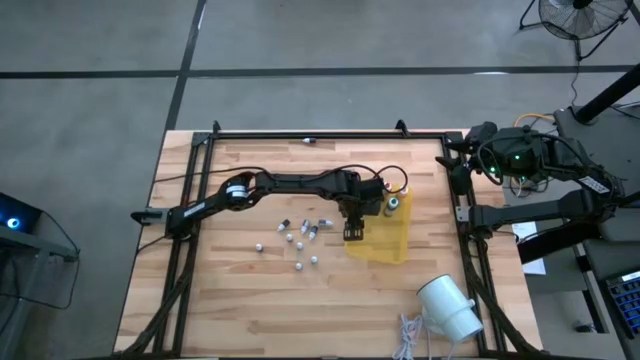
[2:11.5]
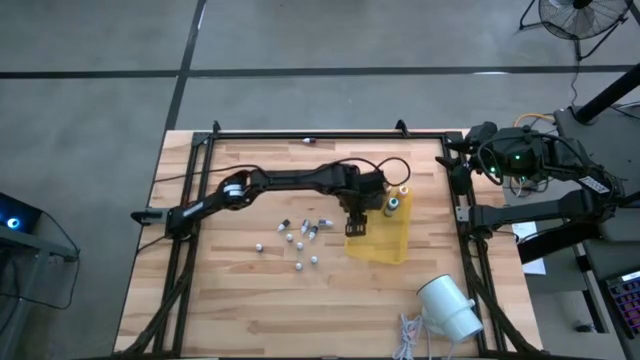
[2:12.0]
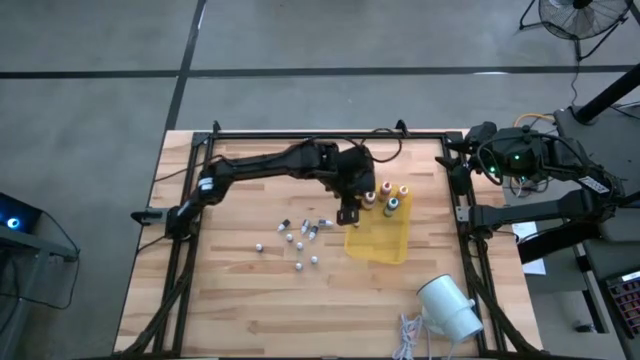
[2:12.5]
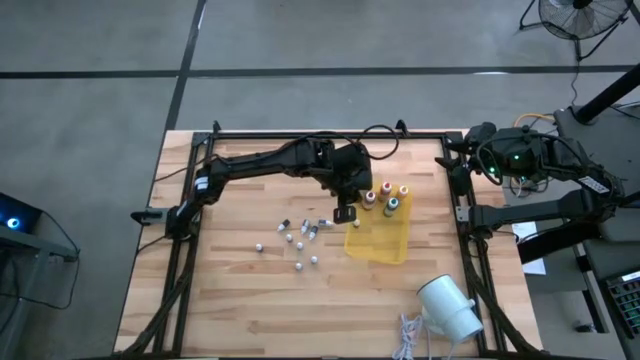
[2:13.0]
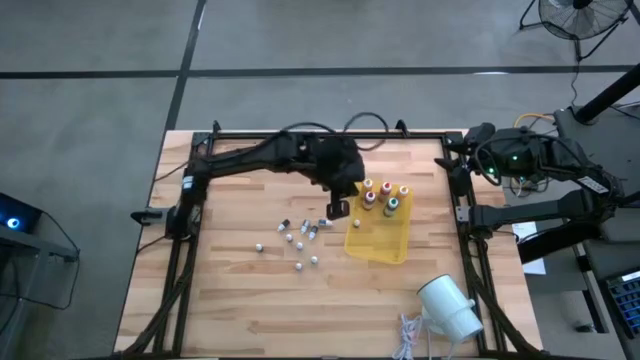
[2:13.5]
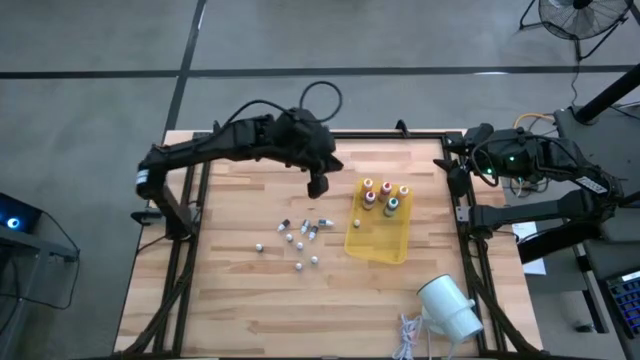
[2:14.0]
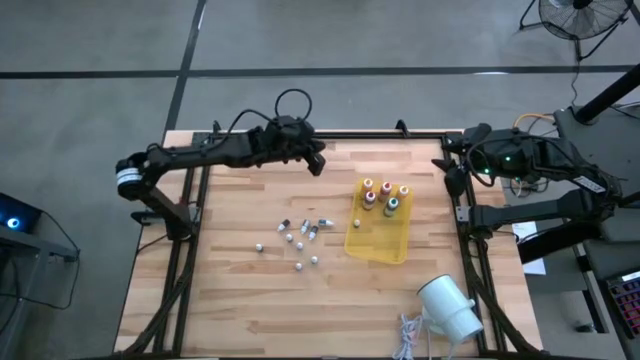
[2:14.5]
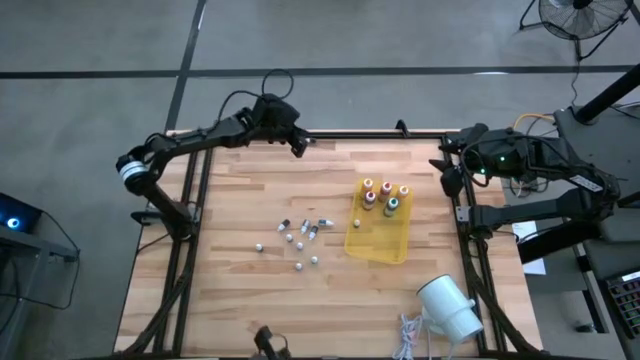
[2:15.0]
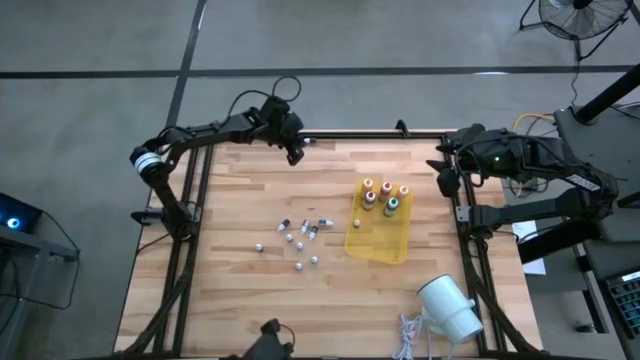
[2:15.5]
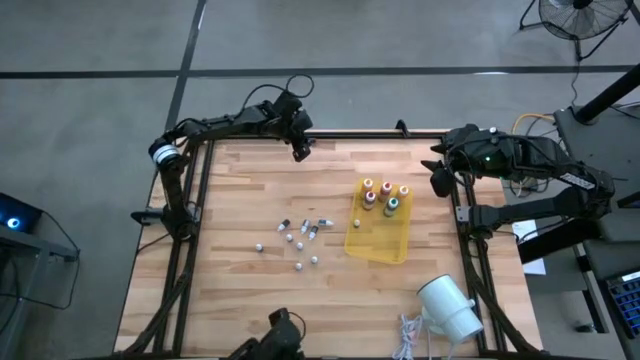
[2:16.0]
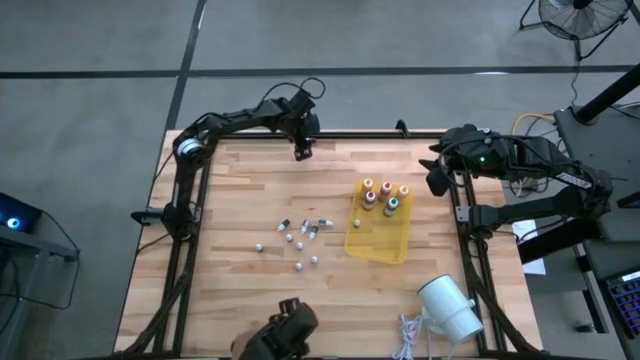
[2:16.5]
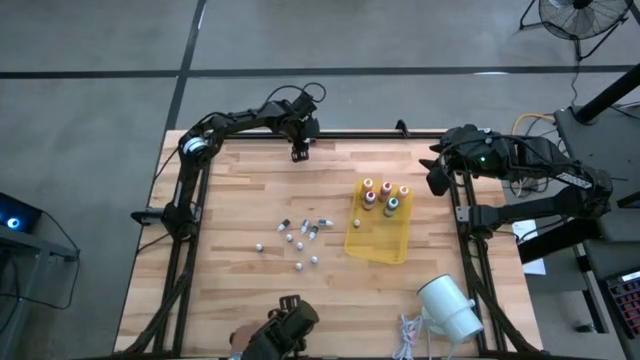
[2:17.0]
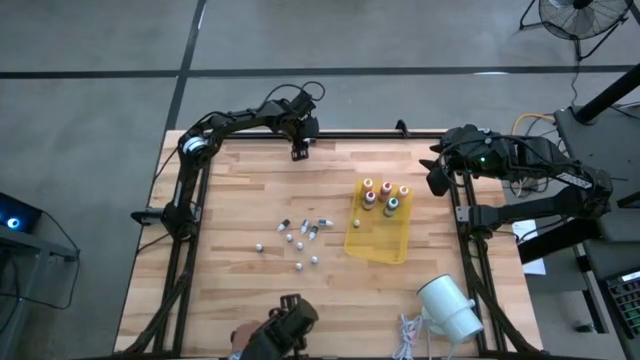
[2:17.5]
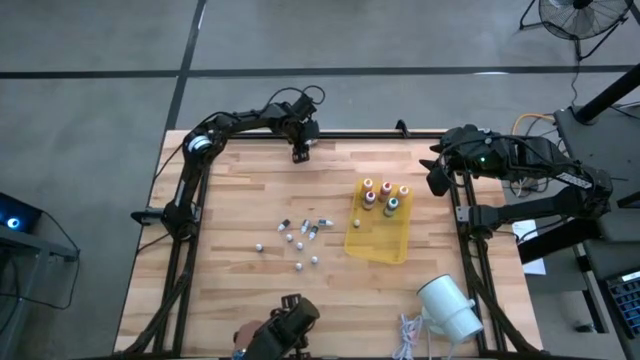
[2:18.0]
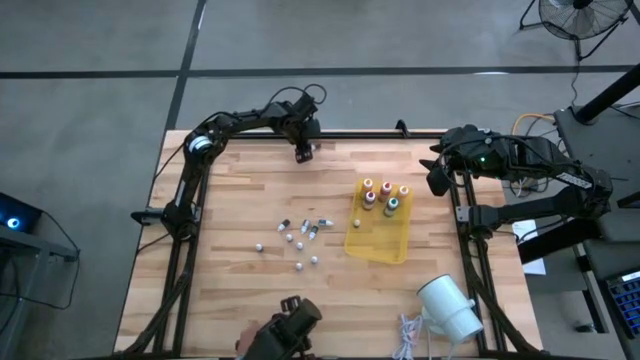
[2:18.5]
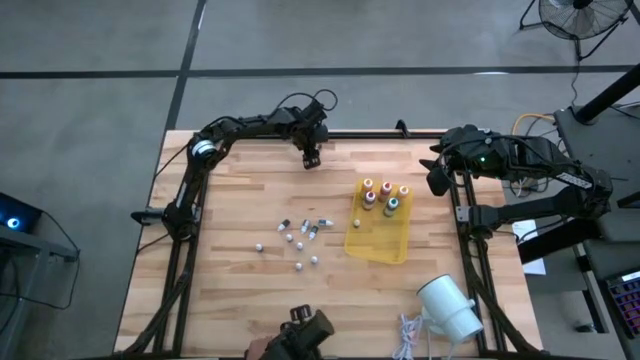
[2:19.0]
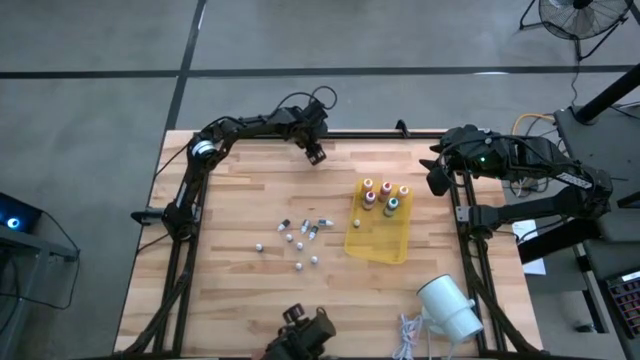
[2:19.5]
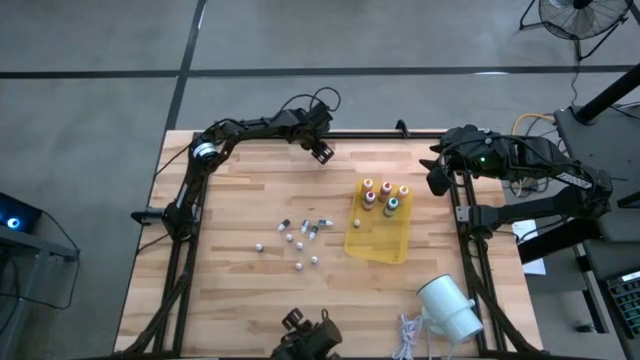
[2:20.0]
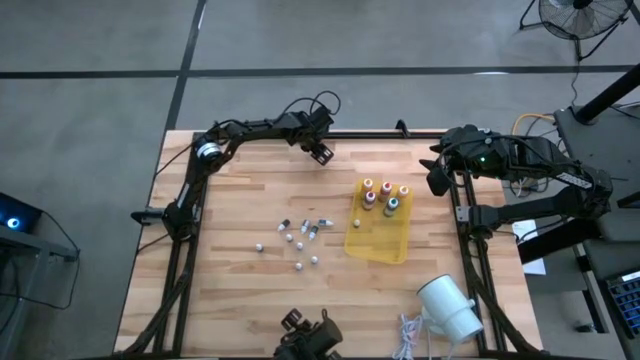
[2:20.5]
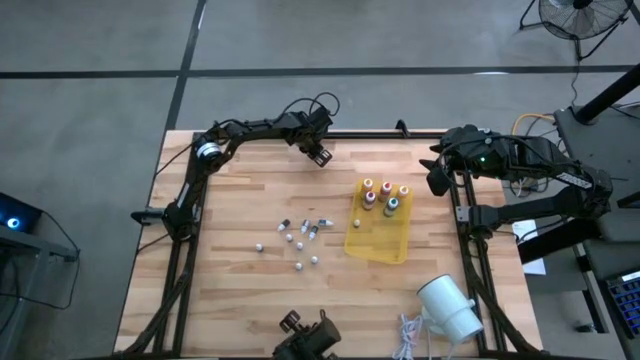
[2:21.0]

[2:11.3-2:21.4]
Task: Pick & Place food coloring
Put the small orange food coloring bottle into the yellow bin

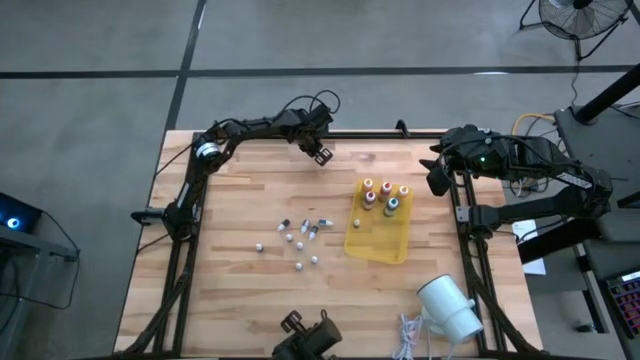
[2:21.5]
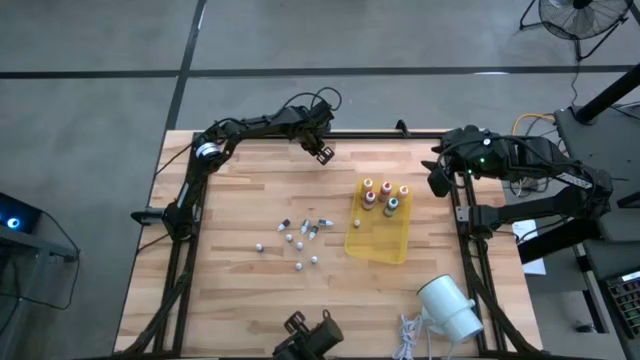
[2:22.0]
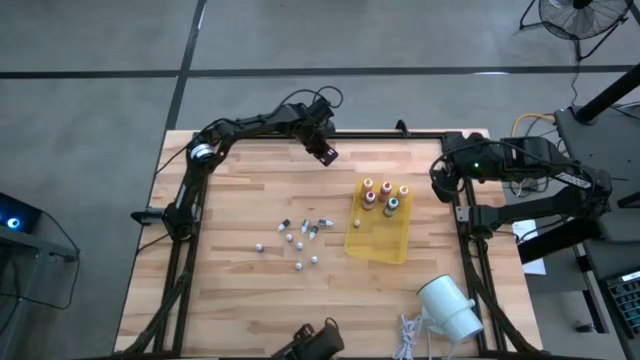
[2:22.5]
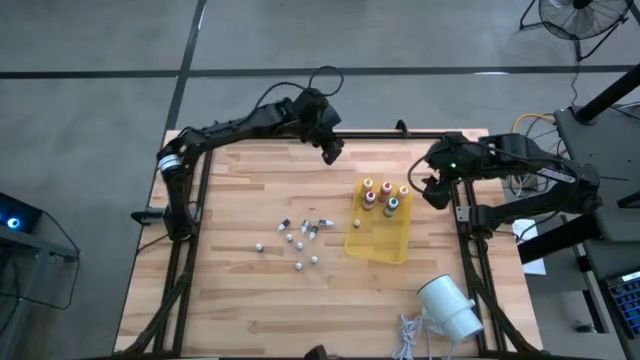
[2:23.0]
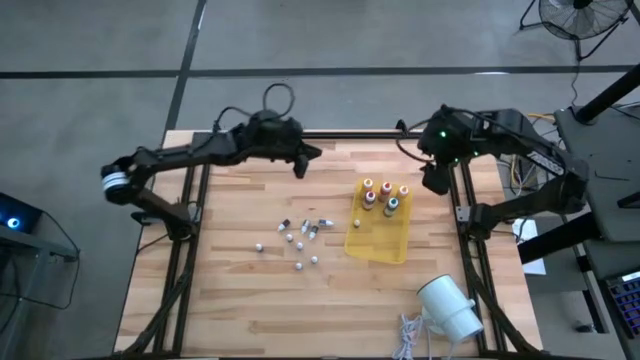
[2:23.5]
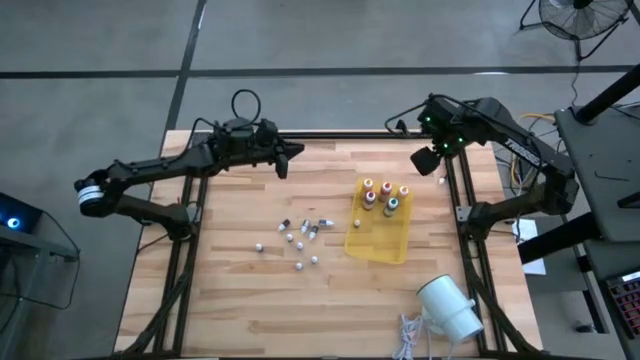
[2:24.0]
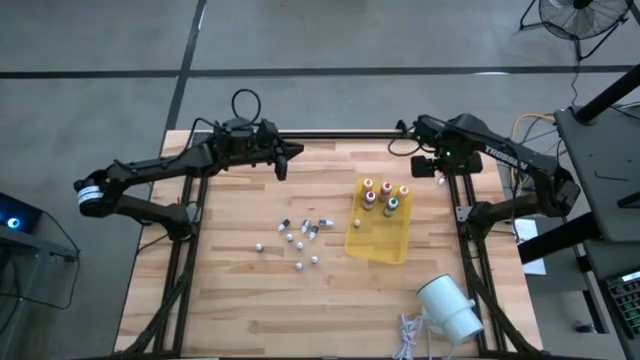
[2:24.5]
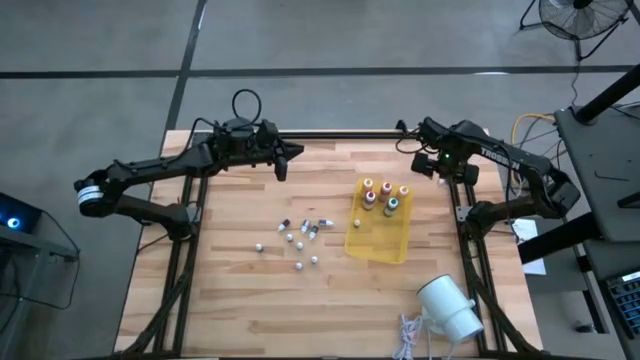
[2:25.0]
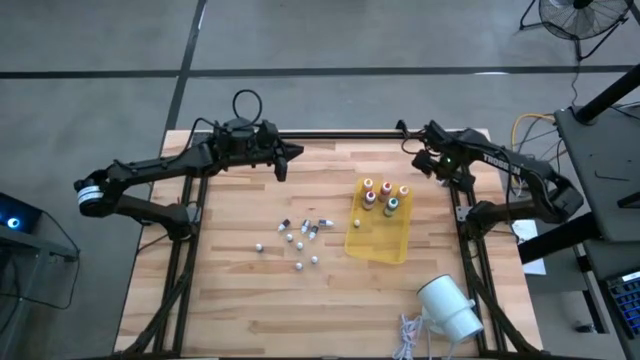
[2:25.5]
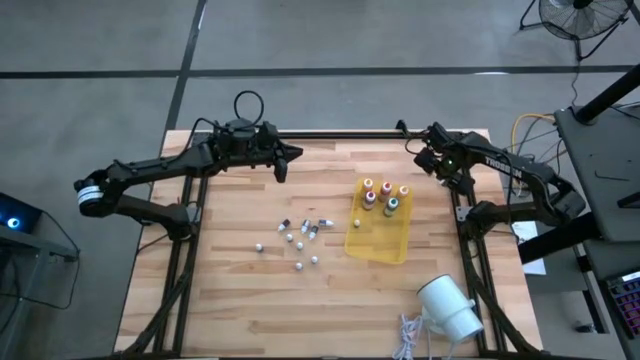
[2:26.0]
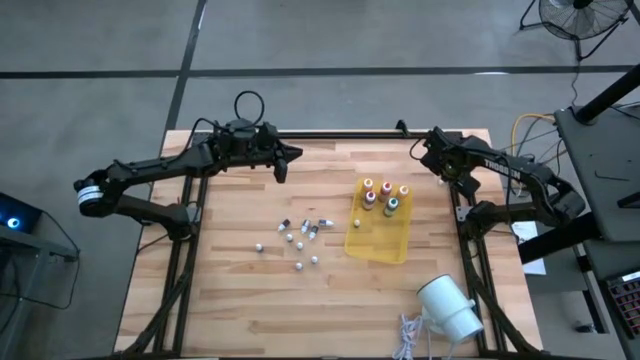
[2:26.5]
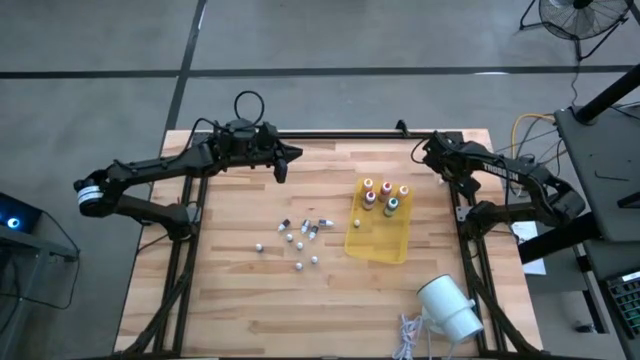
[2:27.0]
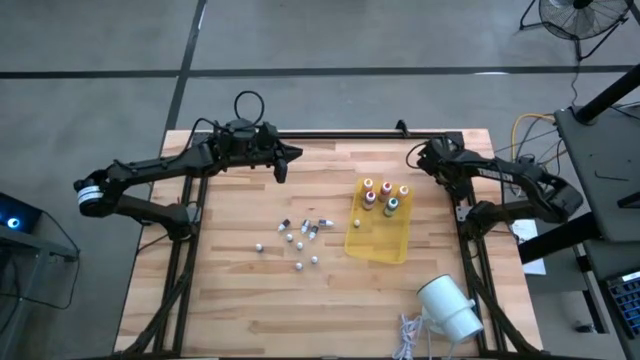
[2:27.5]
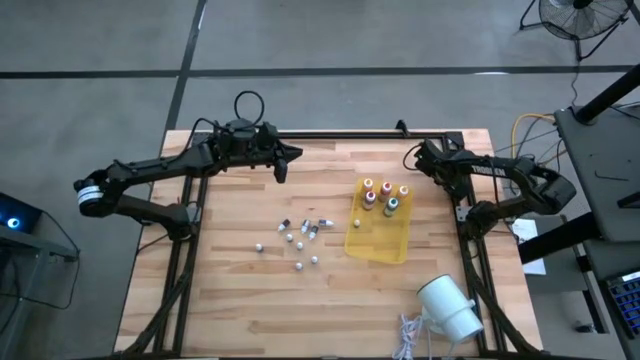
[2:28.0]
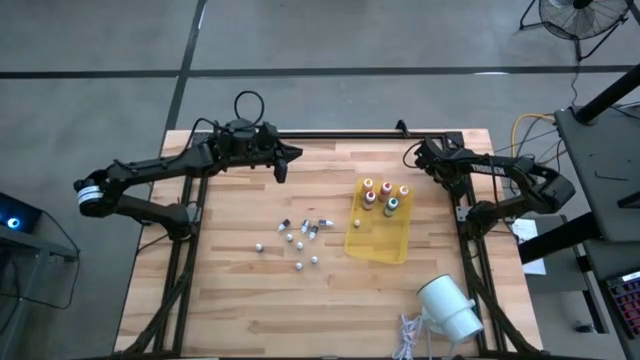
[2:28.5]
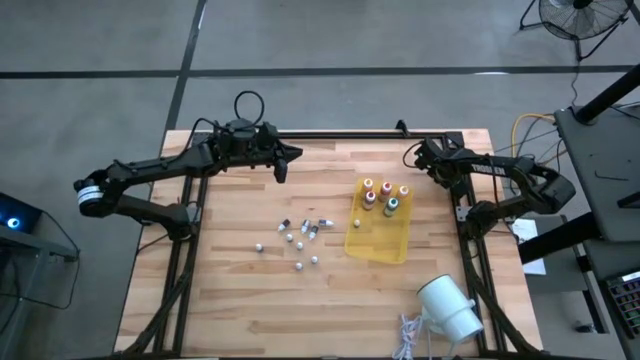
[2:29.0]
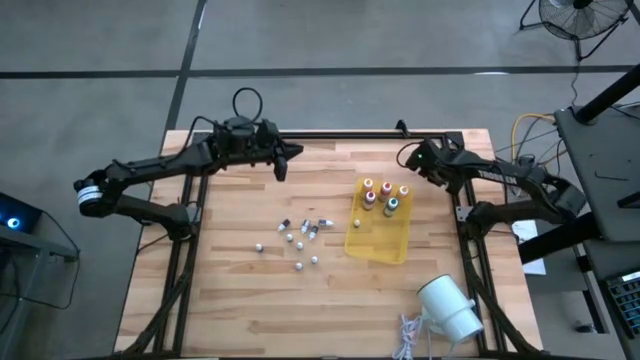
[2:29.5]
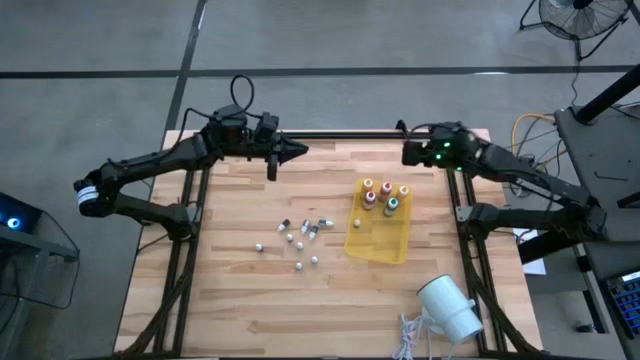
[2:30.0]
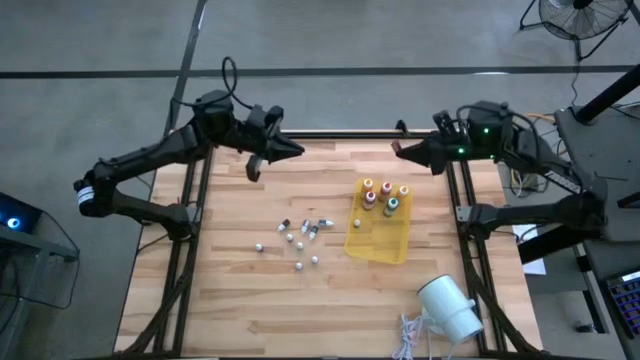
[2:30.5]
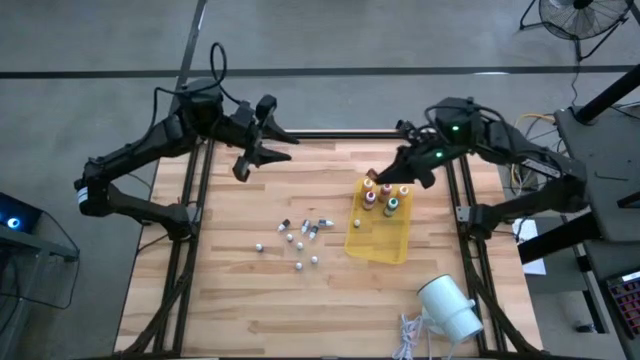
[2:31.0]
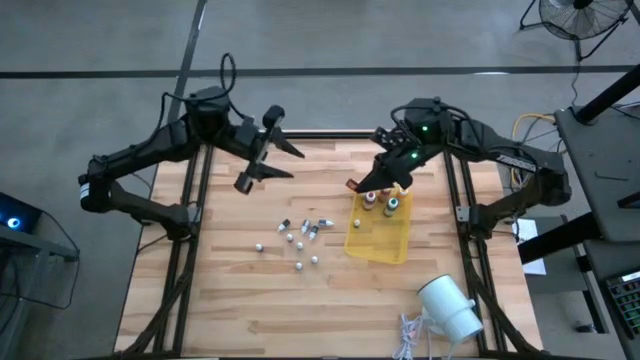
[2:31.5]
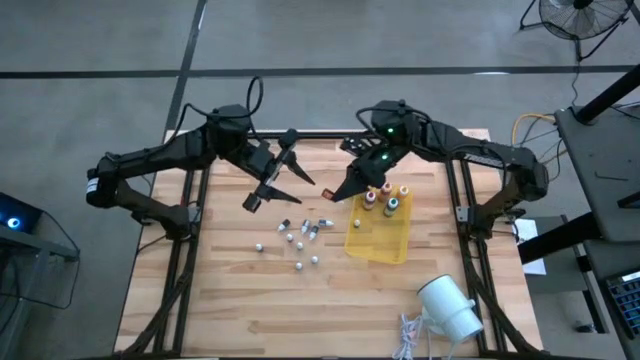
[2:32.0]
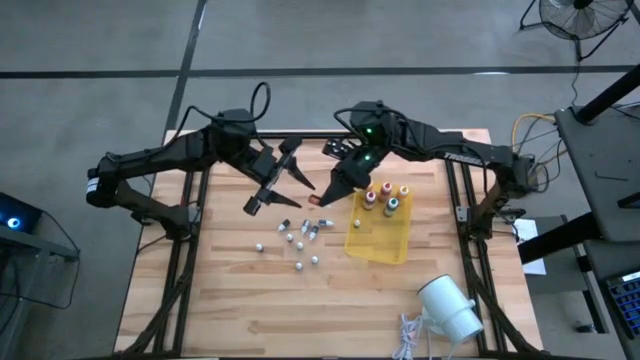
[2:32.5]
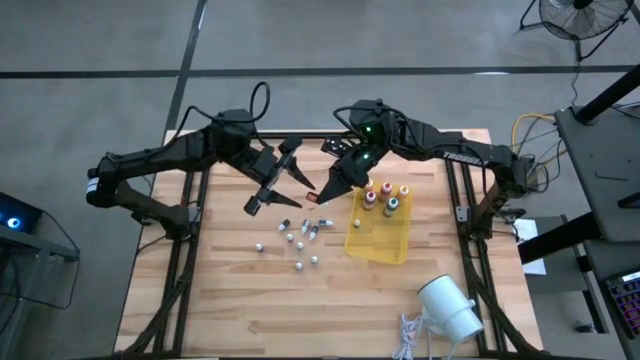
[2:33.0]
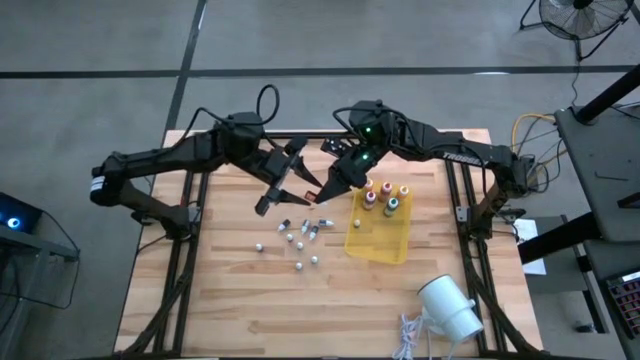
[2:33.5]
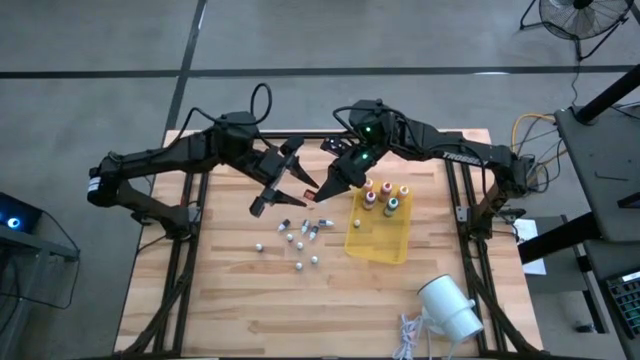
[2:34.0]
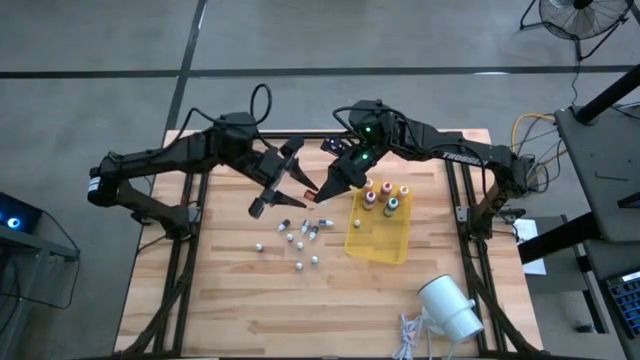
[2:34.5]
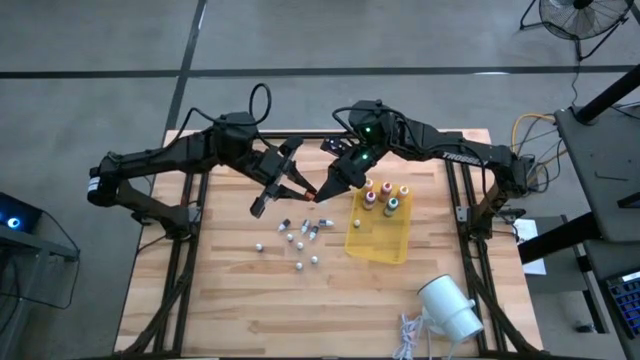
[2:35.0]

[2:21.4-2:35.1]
Put the small orange food coloring bottle into the yellow bin
